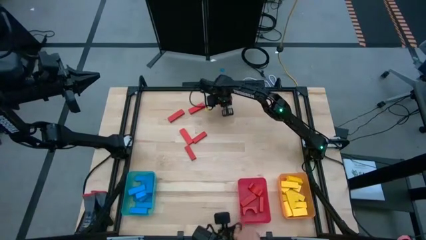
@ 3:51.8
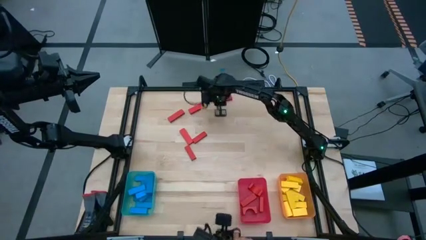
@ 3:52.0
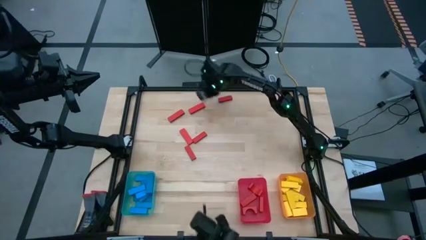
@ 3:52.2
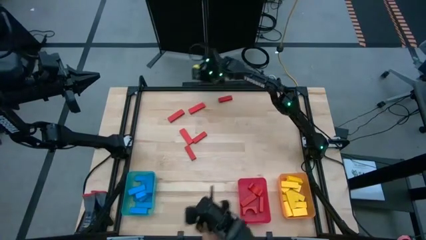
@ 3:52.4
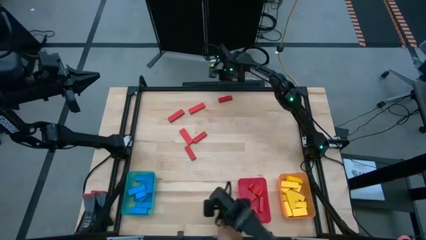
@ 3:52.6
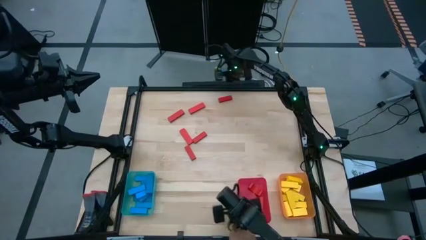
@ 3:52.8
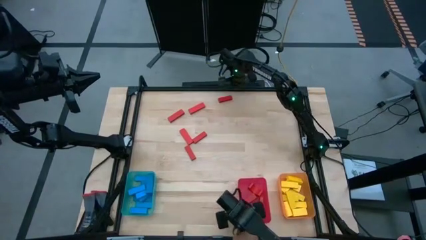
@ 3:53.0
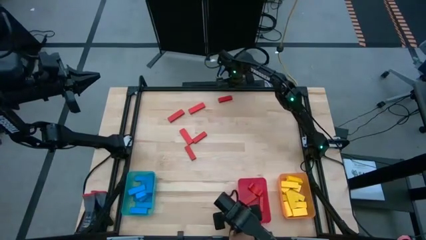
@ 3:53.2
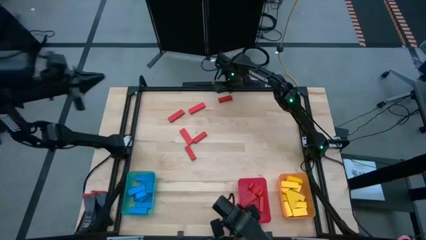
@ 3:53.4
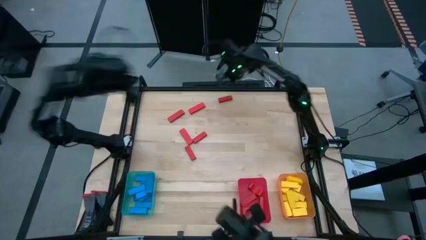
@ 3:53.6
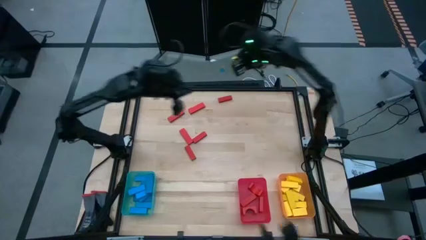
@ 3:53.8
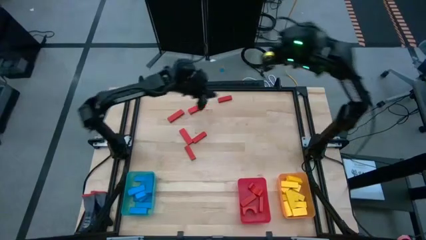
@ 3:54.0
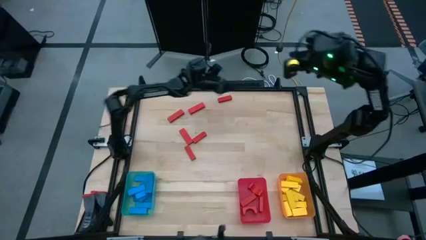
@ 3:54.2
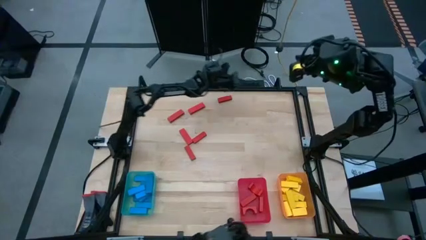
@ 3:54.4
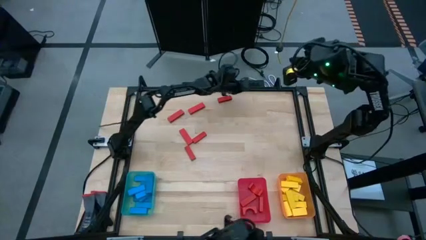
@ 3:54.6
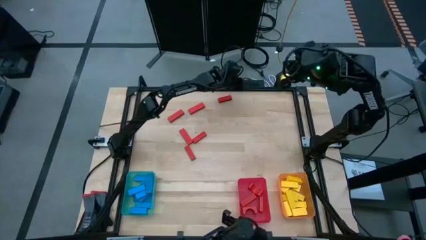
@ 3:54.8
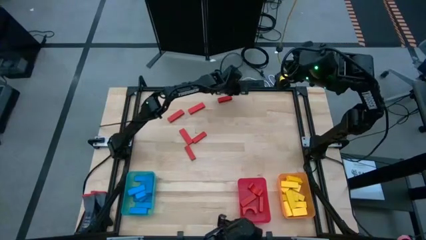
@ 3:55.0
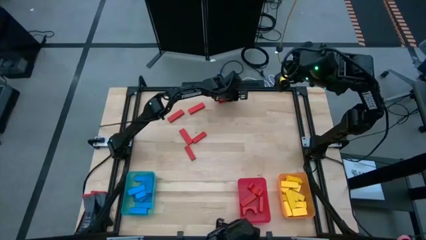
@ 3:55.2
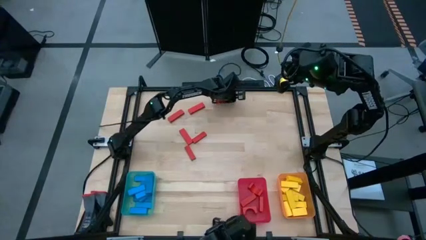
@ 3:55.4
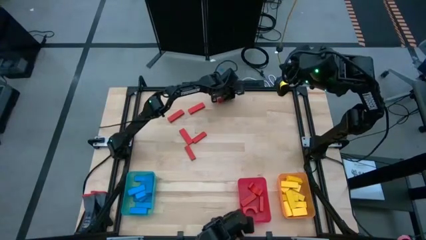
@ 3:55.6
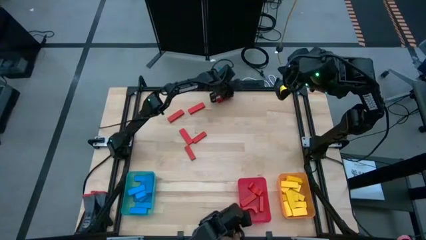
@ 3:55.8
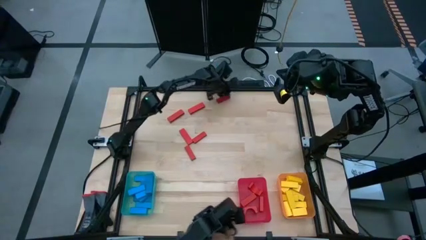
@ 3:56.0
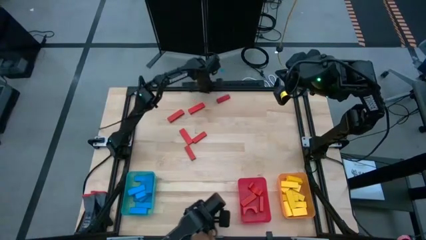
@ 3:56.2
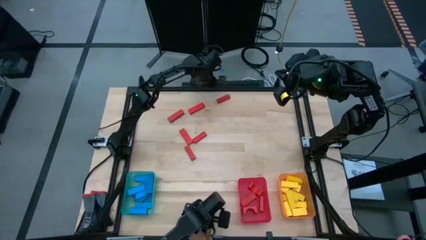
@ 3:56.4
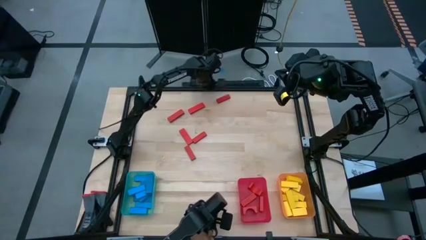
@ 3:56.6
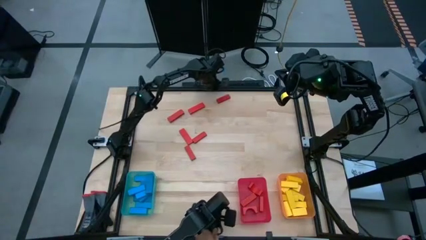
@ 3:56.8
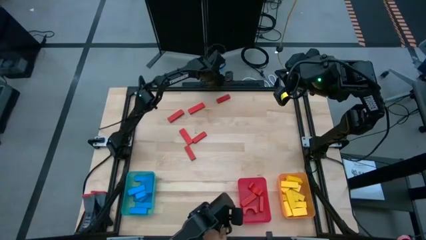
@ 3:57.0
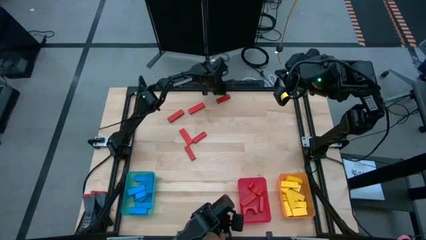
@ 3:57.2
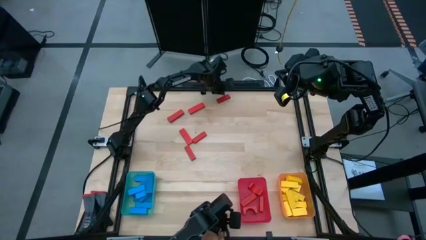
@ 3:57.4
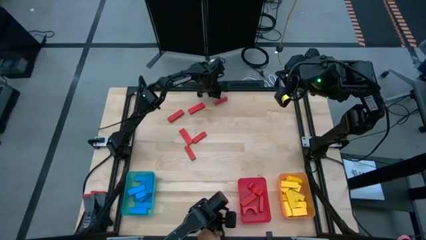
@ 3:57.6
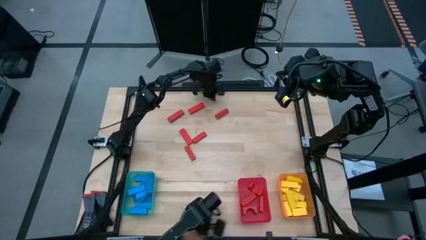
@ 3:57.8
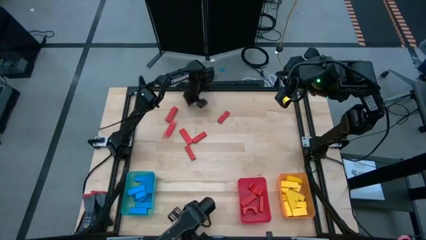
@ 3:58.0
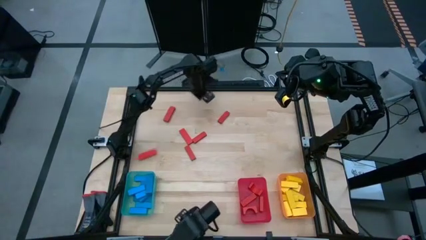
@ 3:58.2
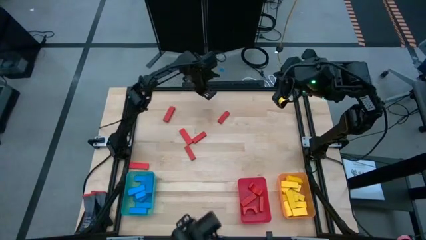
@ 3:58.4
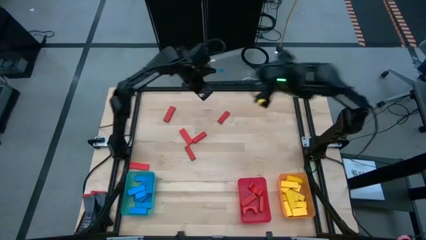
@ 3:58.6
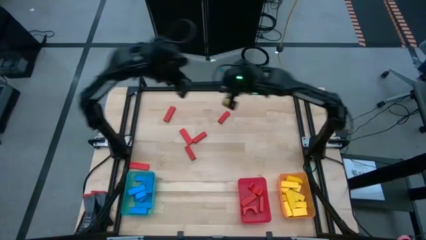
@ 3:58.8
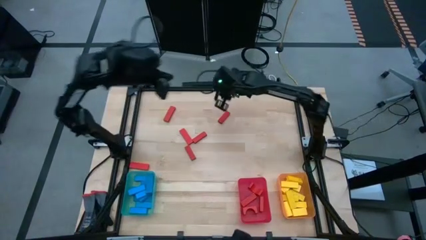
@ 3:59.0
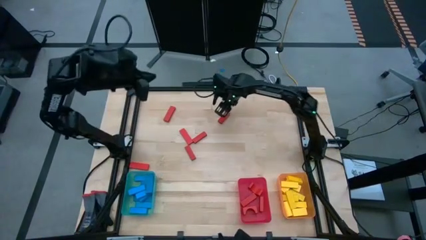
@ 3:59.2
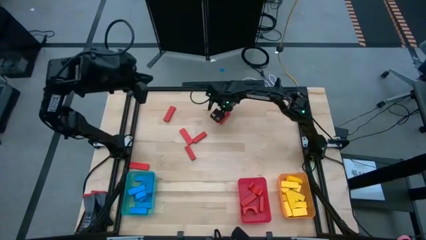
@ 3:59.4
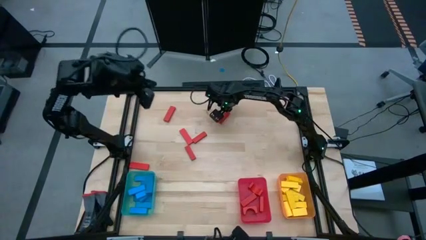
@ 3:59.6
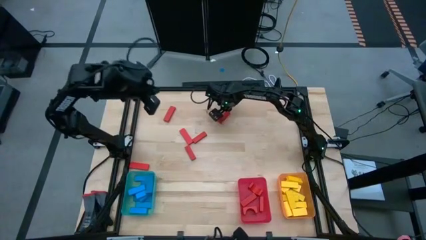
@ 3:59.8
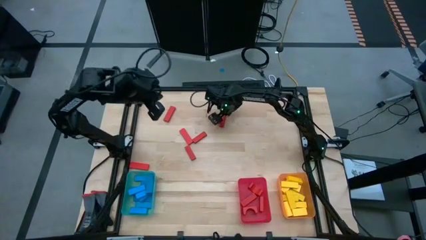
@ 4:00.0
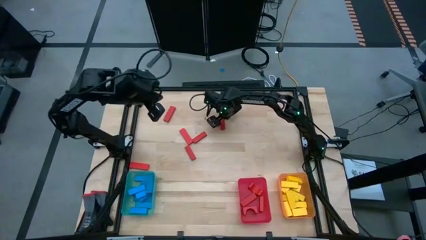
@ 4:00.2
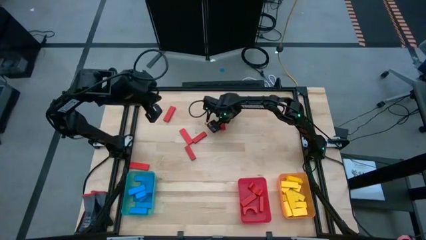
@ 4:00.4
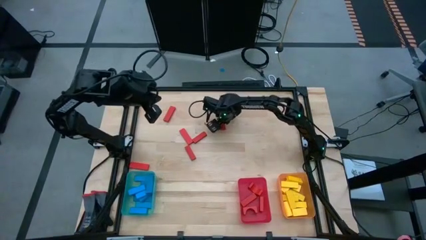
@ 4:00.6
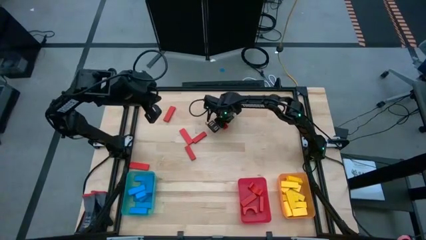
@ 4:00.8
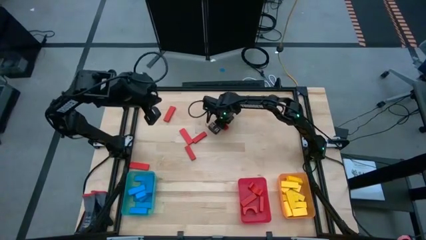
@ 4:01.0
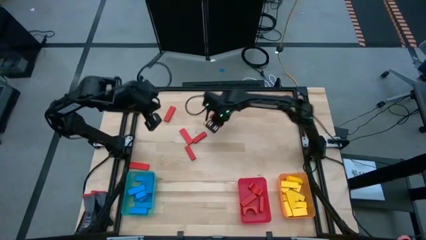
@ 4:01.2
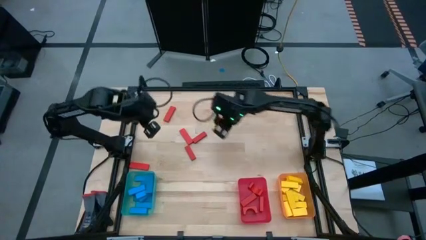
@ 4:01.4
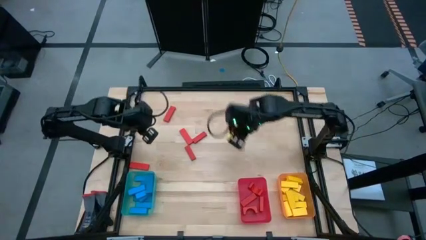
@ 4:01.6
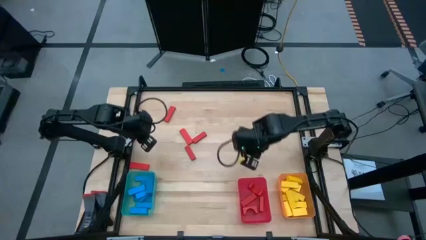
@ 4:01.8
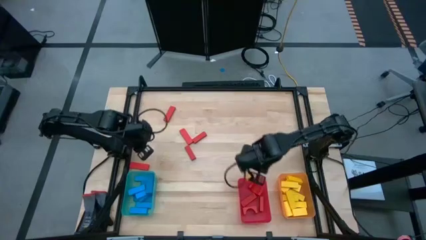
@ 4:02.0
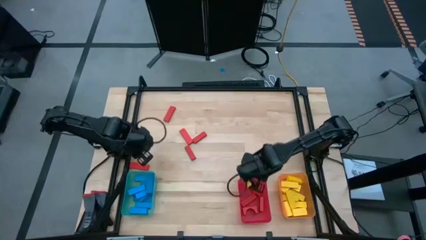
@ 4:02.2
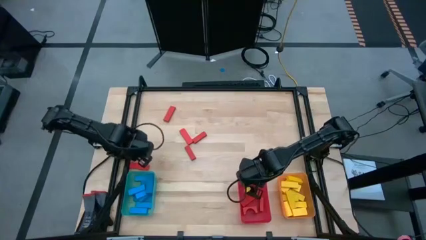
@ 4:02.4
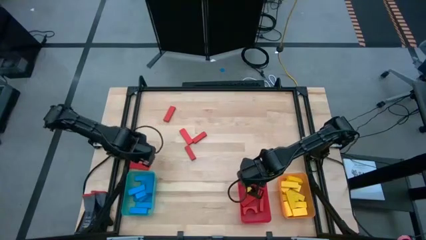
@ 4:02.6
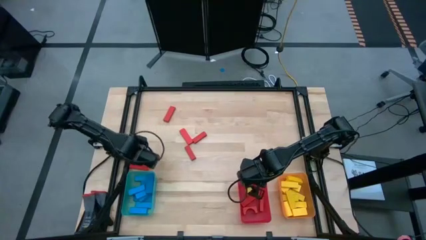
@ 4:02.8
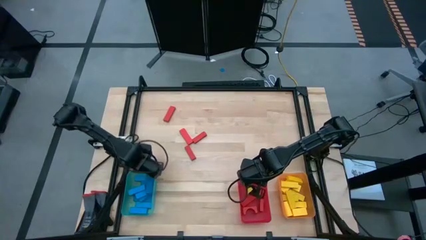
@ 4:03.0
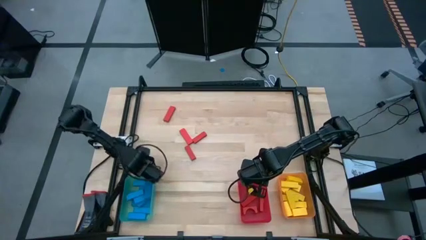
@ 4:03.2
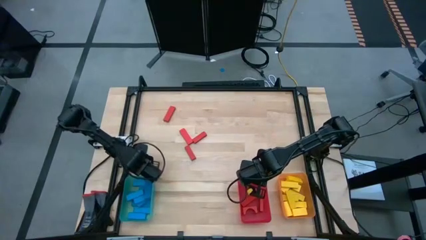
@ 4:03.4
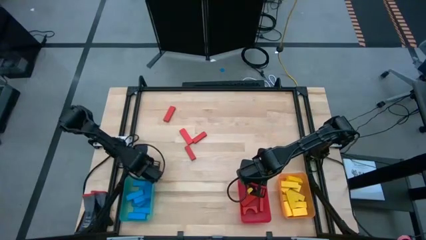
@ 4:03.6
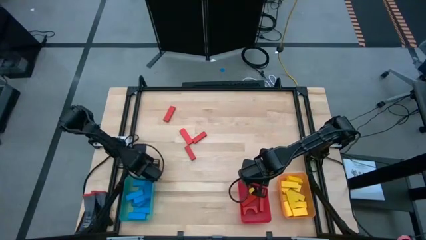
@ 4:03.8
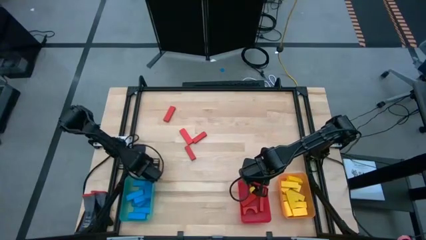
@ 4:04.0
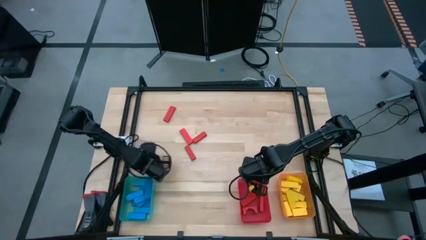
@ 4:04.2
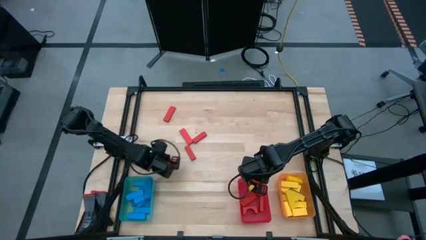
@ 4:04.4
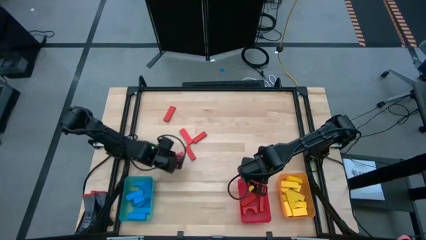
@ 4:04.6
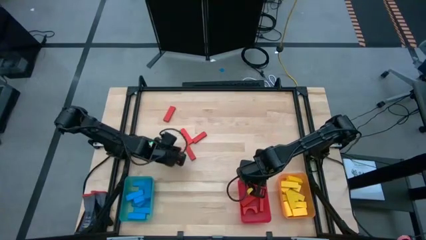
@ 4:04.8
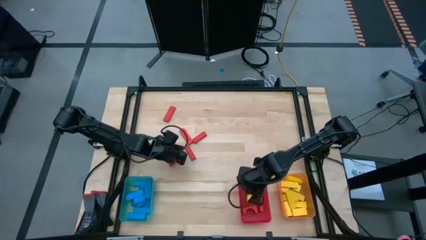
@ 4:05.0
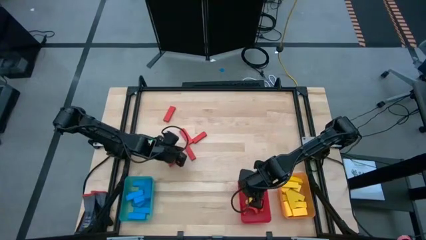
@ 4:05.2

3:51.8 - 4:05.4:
Task: Sort blocks
Put the red block into the red bin
